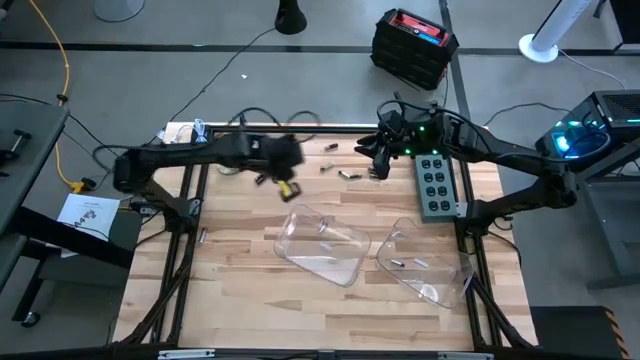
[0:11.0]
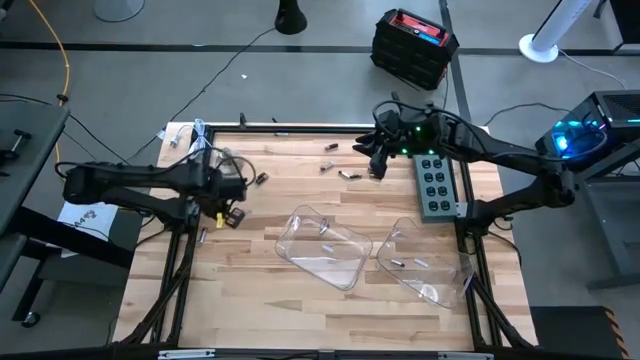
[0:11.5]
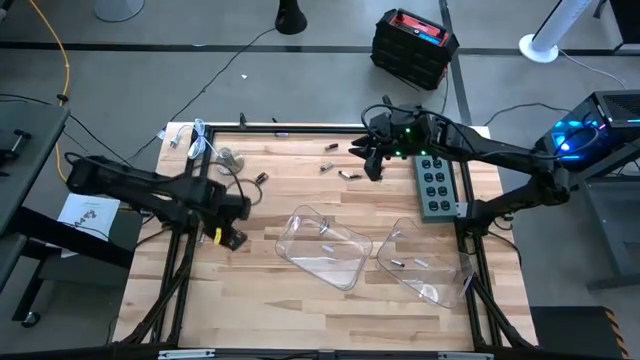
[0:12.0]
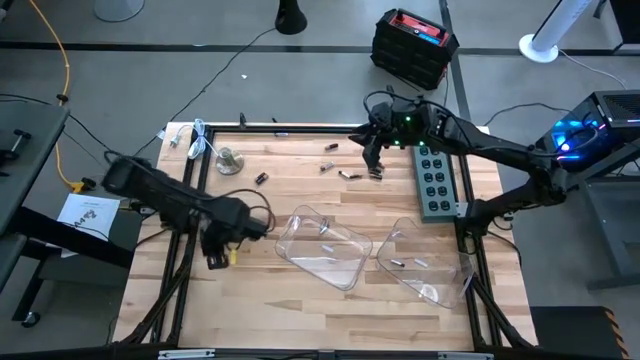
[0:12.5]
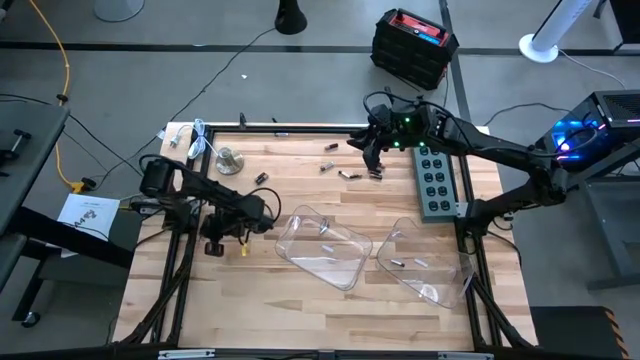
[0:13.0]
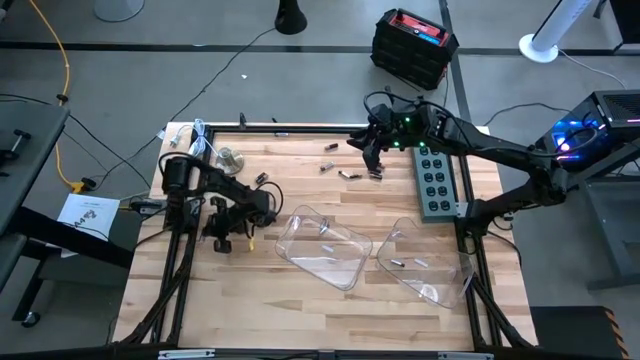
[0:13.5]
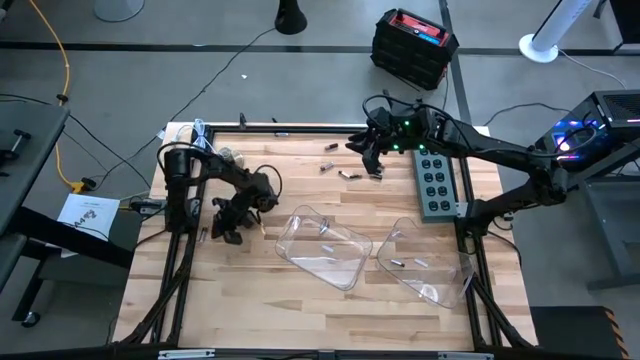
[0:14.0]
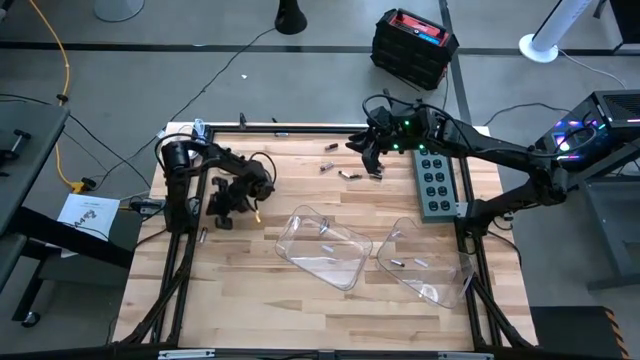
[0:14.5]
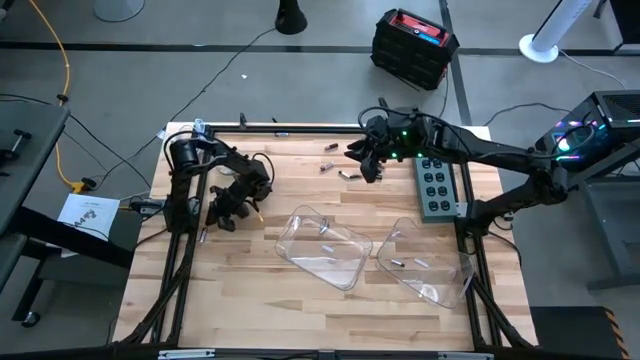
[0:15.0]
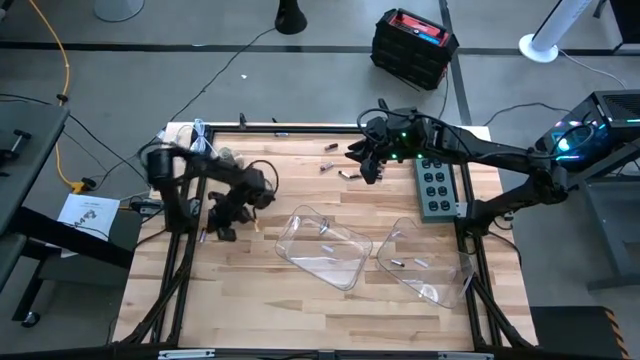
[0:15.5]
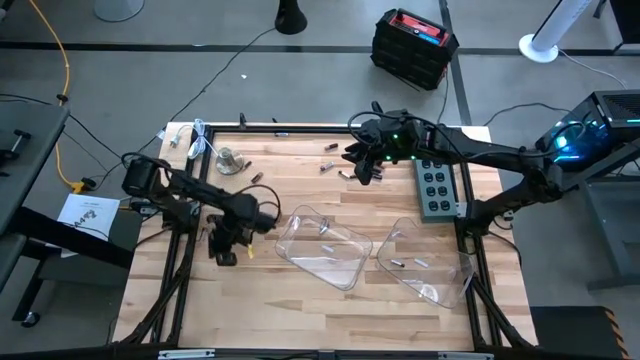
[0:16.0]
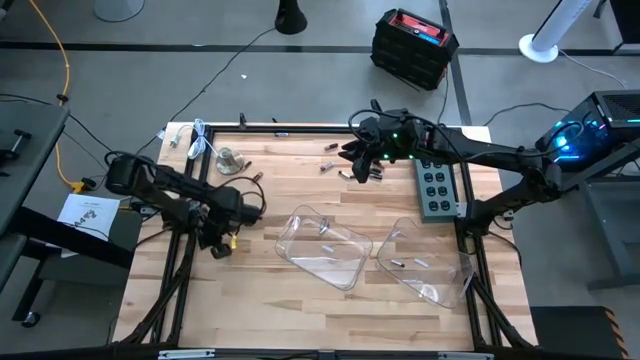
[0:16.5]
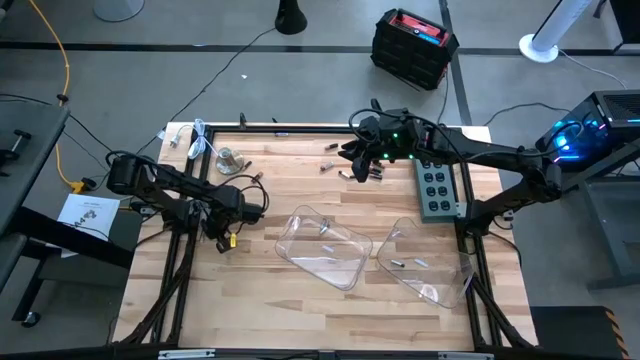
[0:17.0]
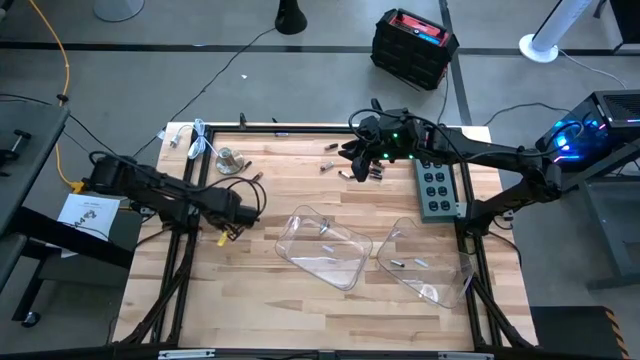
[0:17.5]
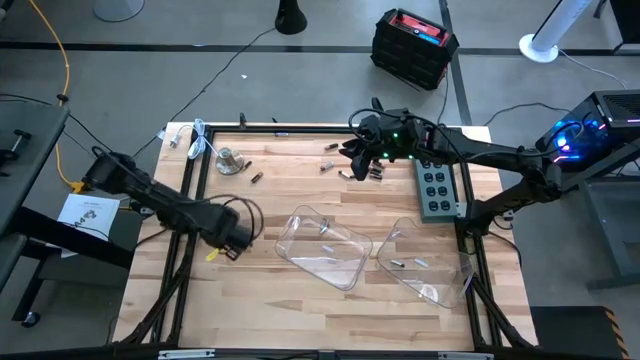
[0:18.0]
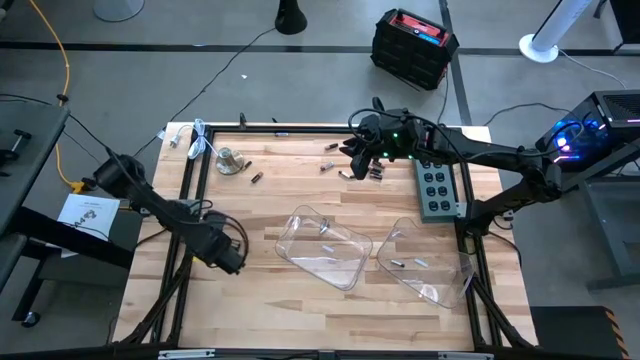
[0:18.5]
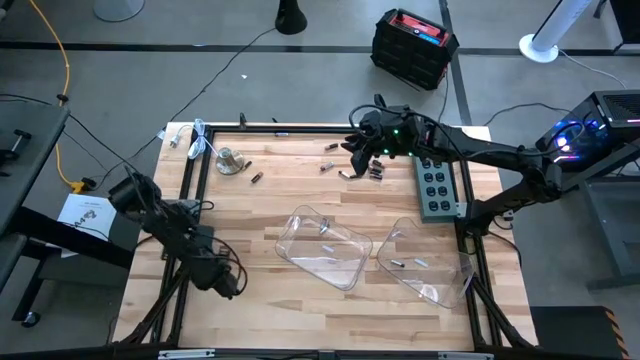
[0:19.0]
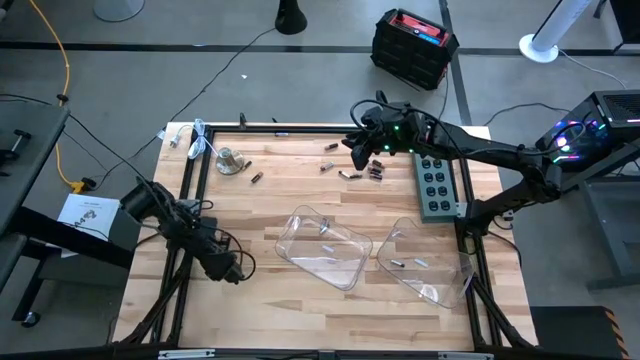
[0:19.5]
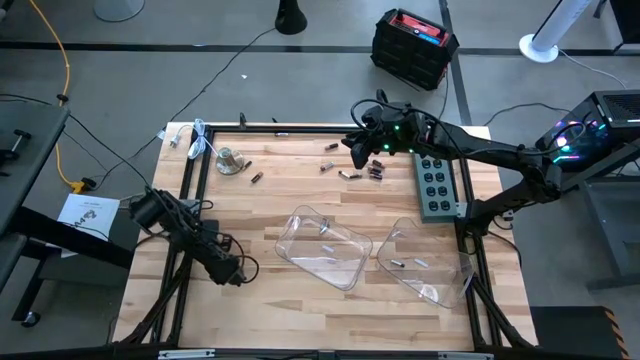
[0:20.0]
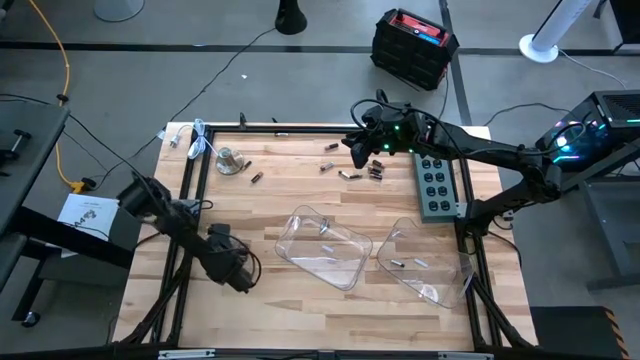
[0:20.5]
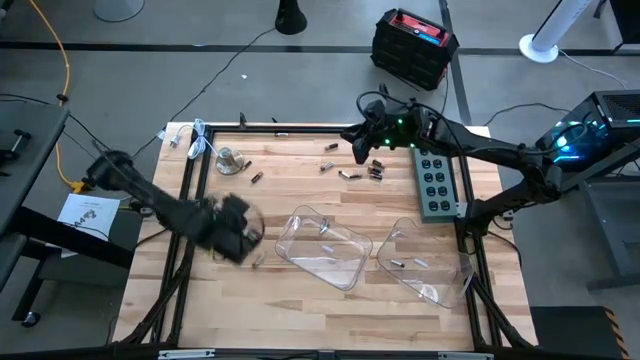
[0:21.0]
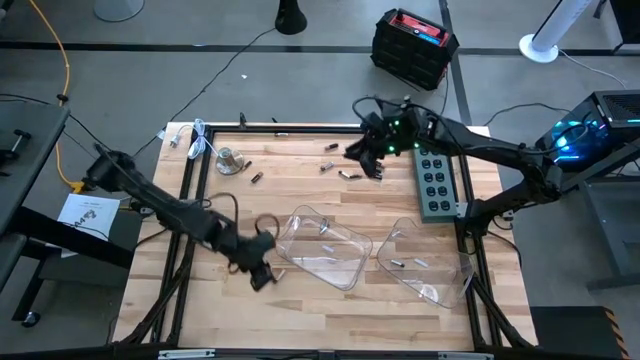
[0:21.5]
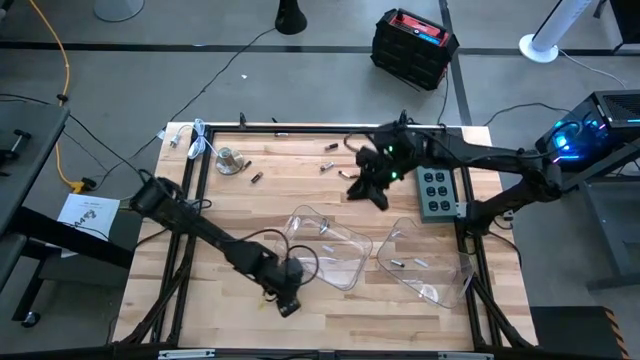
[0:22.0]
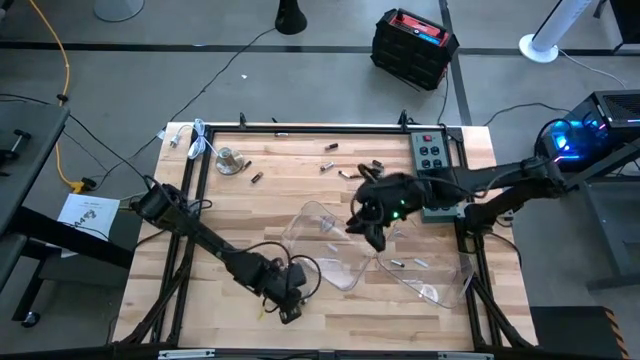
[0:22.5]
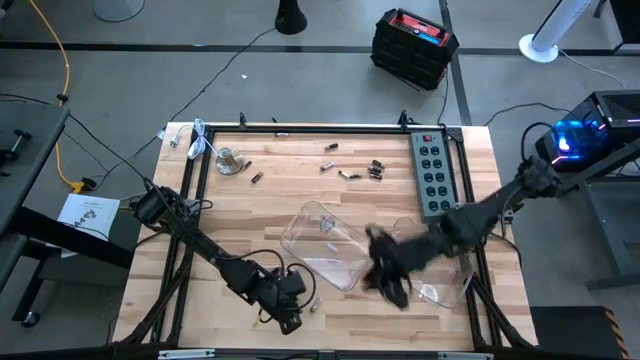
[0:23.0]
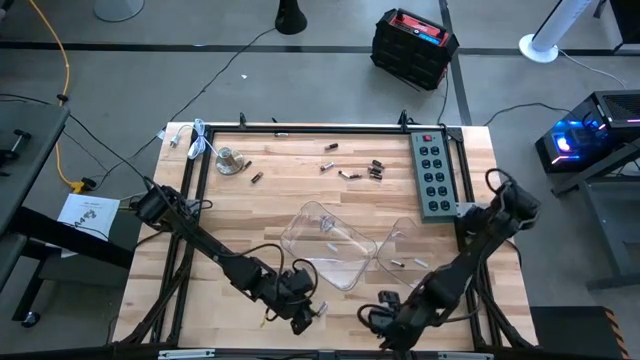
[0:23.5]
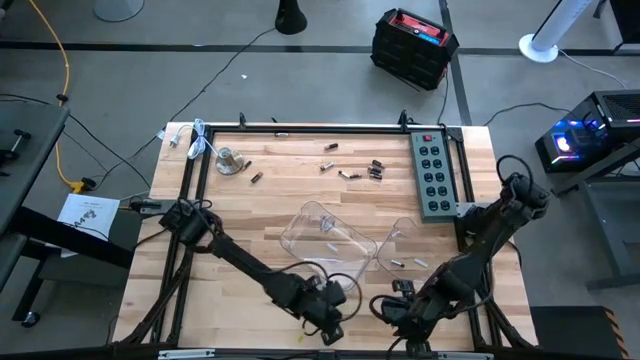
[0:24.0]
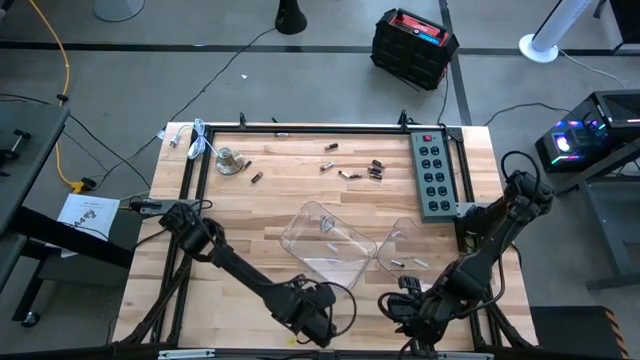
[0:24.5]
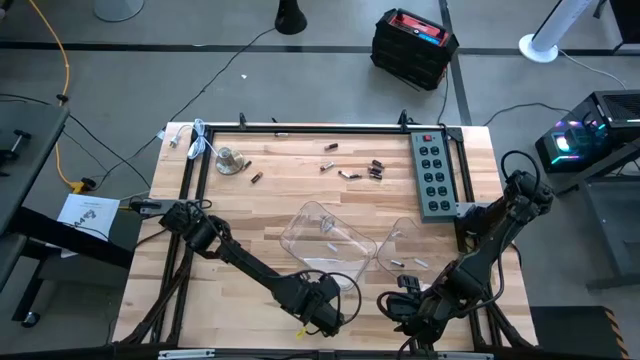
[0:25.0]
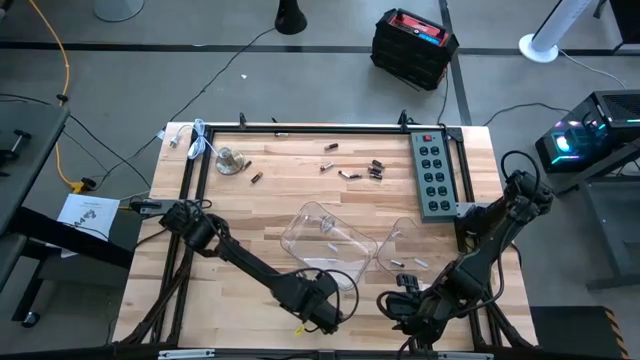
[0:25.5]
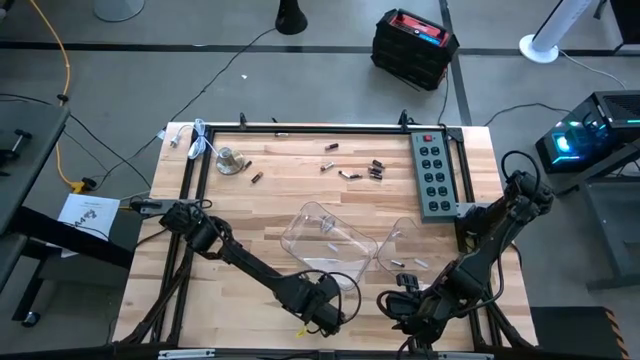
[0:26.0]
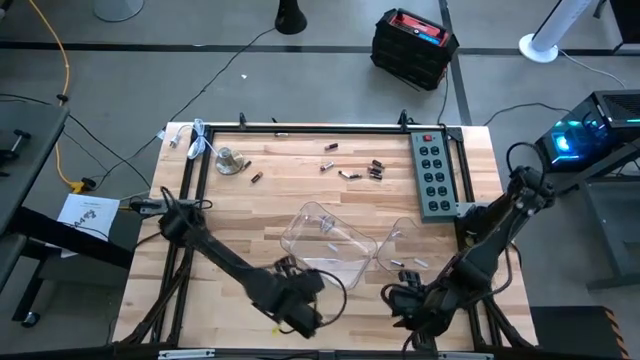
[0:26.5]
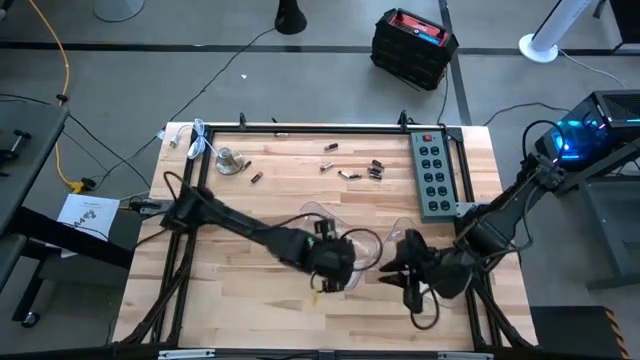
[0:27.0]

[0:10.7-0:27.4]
Task: Sort batteries
Put the silver battery into the left transparent bin

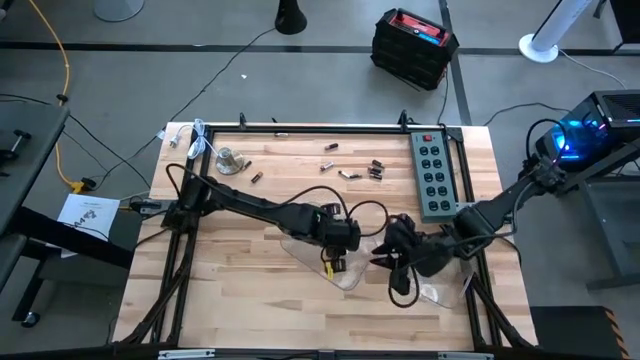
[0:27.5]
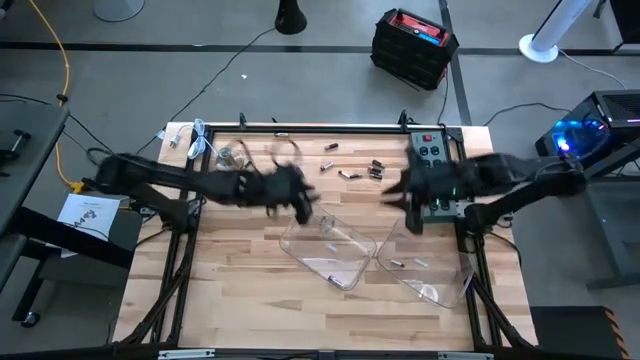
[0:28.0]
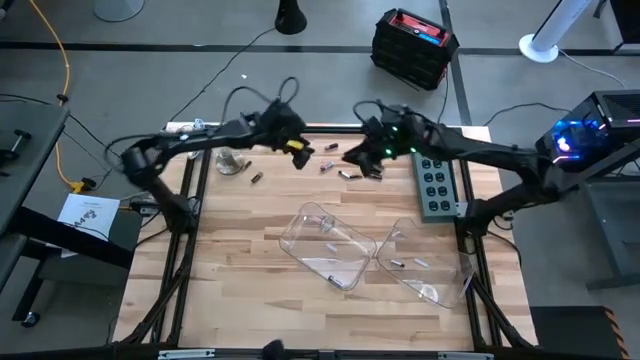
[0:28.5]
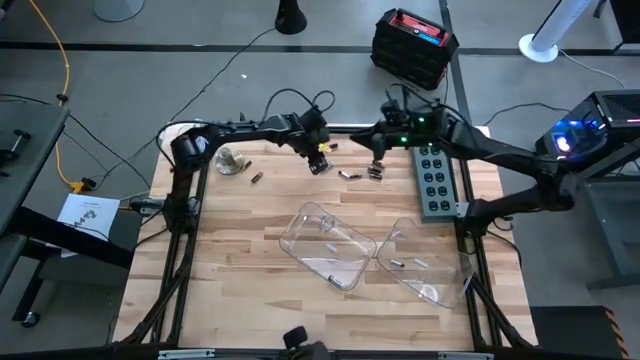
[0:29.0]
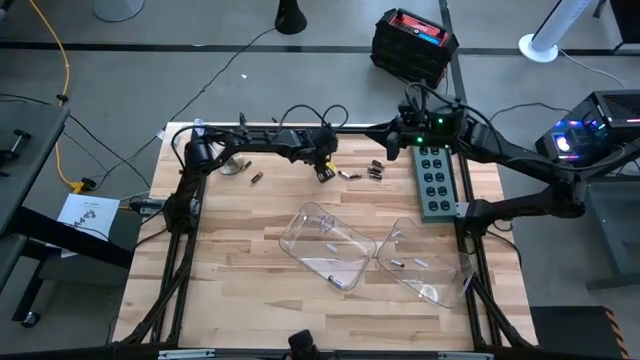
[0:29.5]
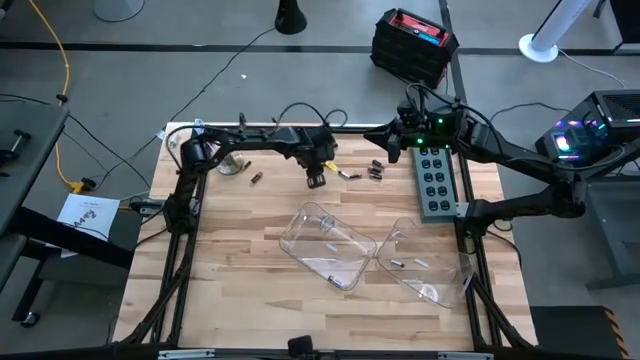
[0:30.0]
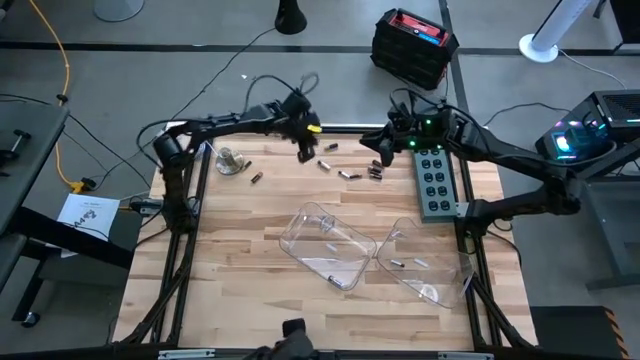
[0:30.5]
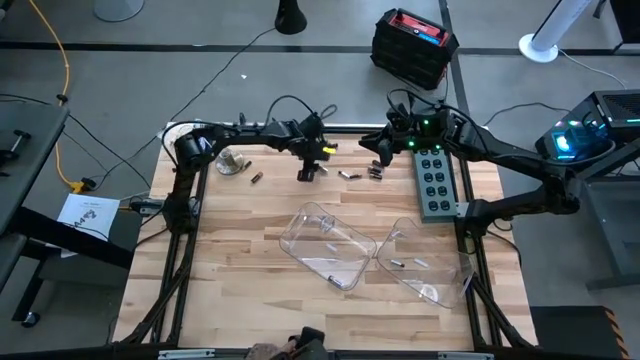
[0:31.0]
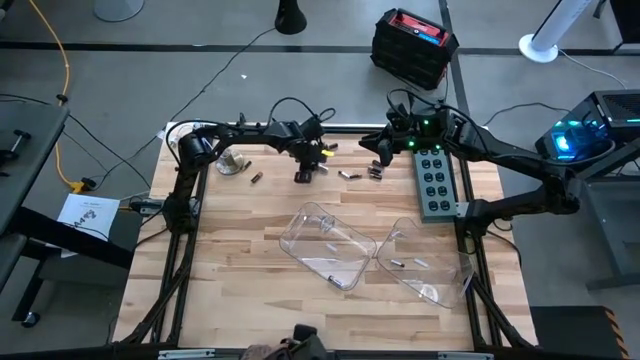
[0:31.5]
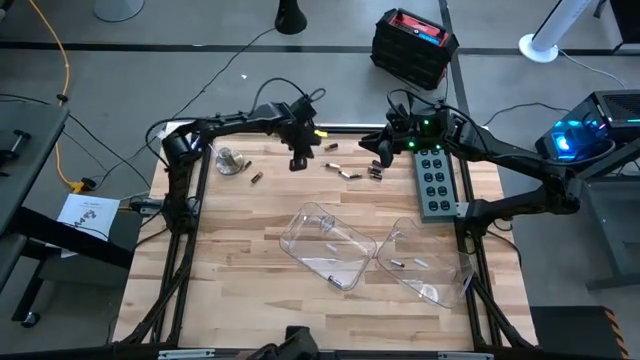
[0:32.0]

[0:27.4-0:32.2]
Put the silver battery into the left transparent bin
